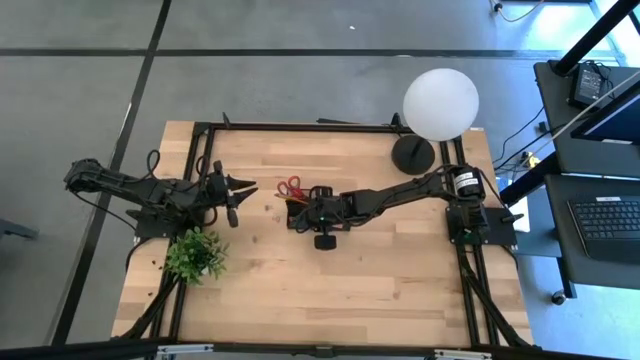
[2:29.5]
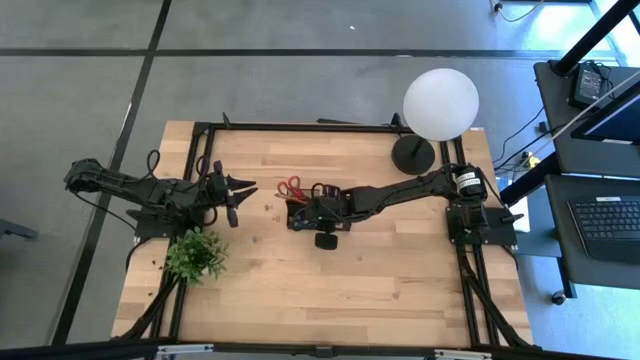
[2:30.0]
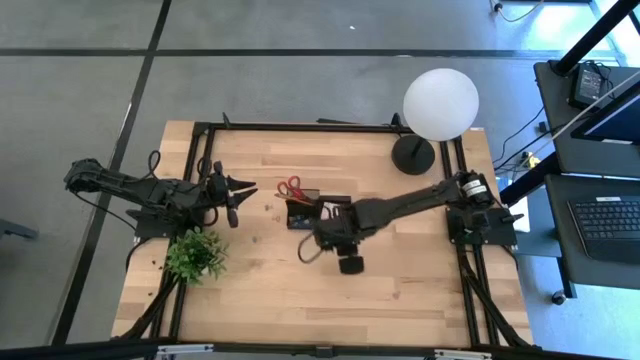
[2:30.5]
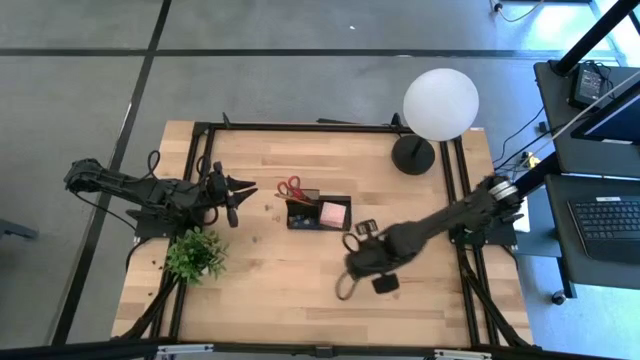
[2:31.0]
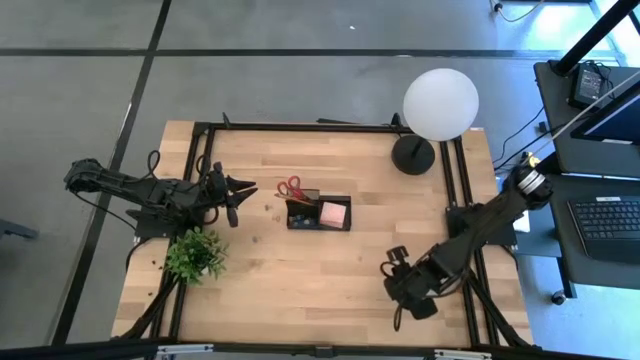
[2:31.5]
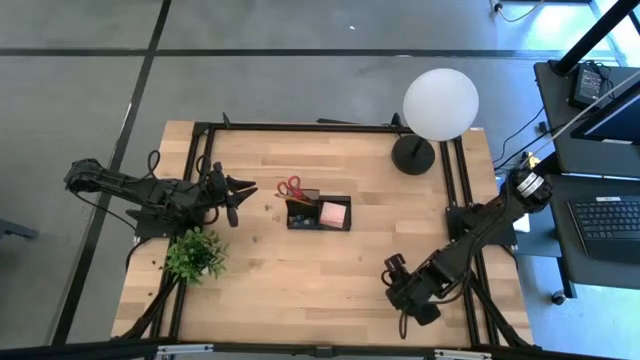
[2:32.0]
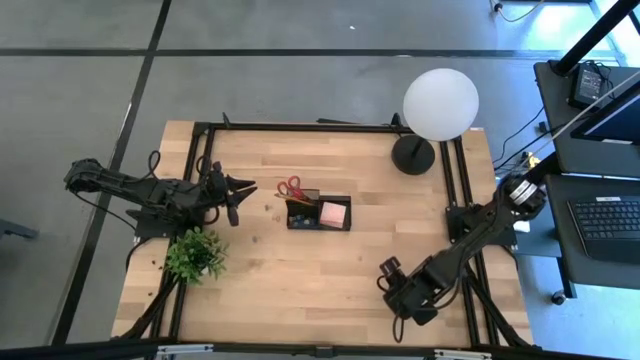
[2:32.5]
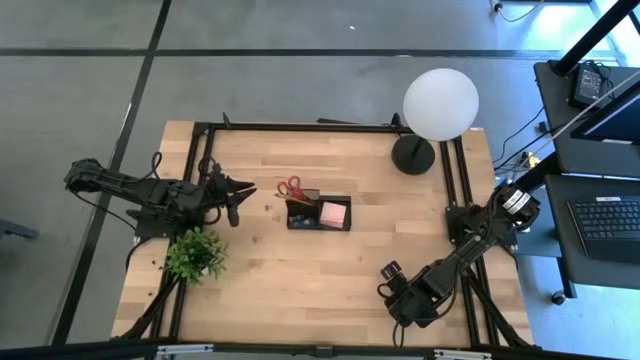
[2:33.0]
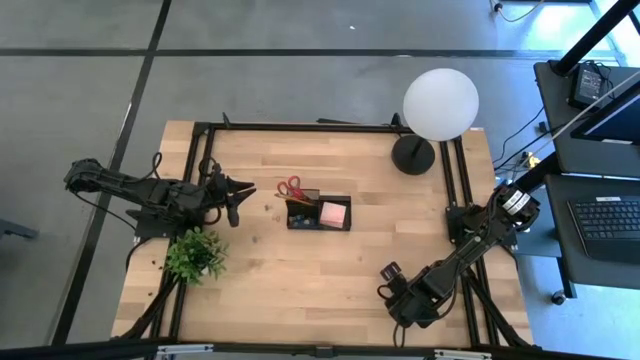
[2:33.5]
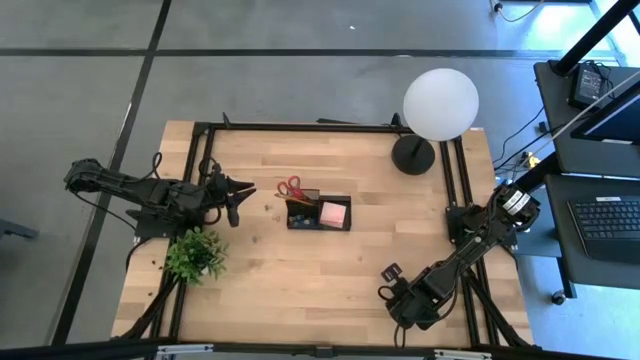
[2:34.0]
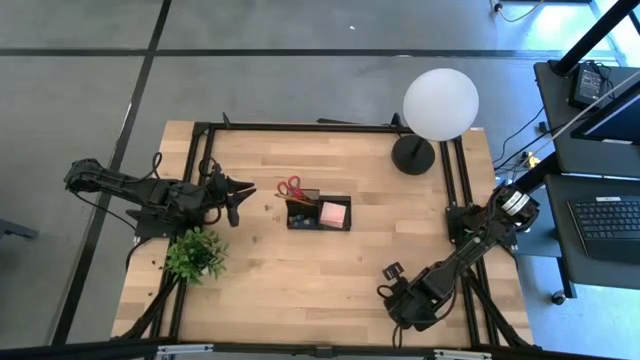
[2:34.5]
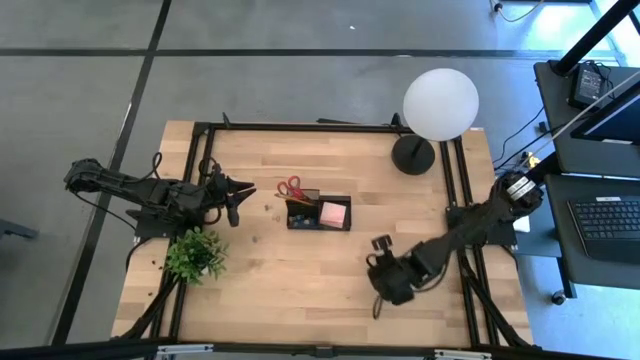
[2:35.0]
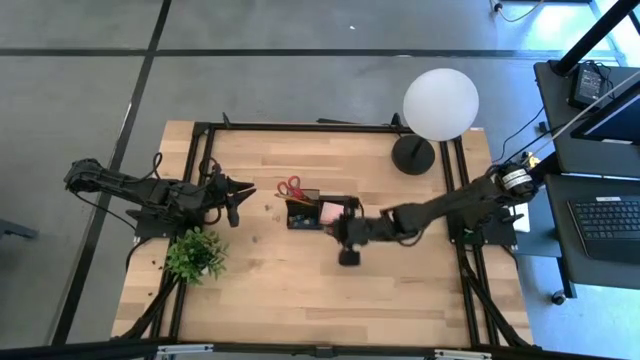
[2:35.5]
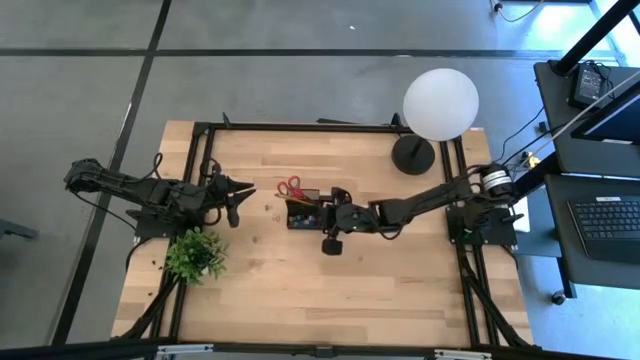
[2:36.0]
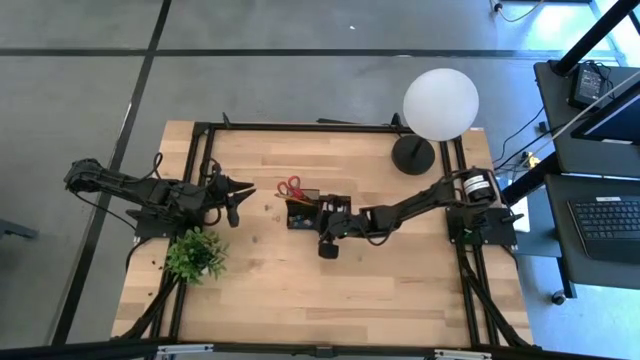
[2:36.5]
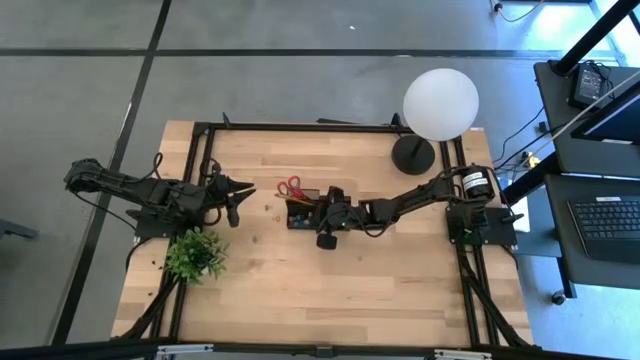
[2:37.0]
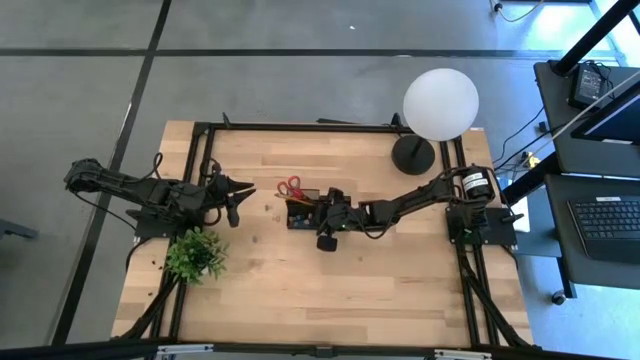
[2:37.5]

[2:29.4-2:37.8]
Task: Pick and place office supplies into organizer
Put the pink binder clip into the black desk organizer

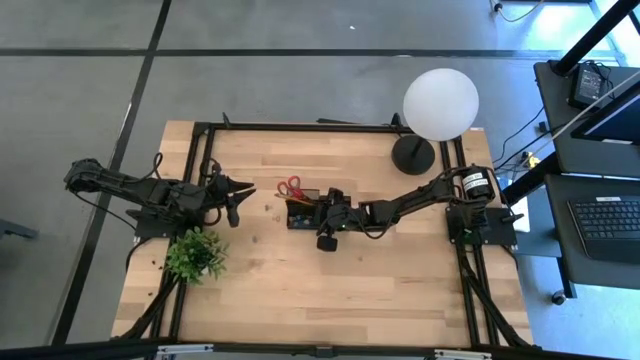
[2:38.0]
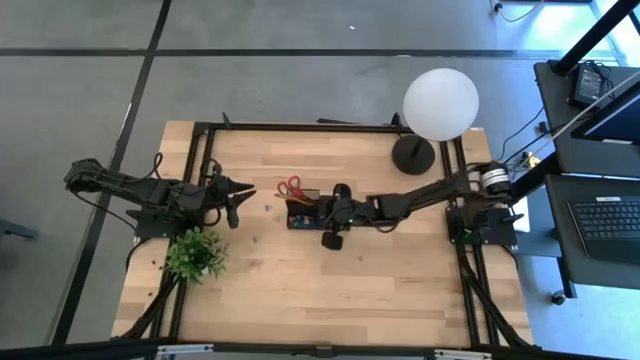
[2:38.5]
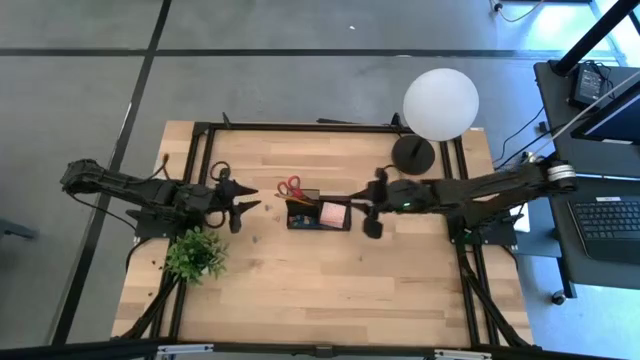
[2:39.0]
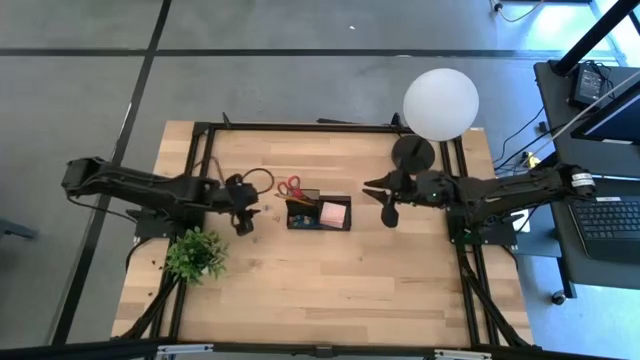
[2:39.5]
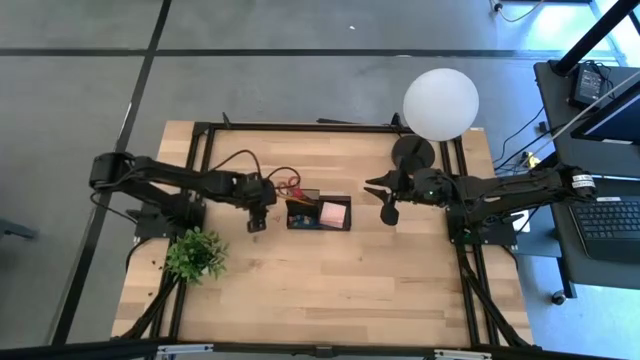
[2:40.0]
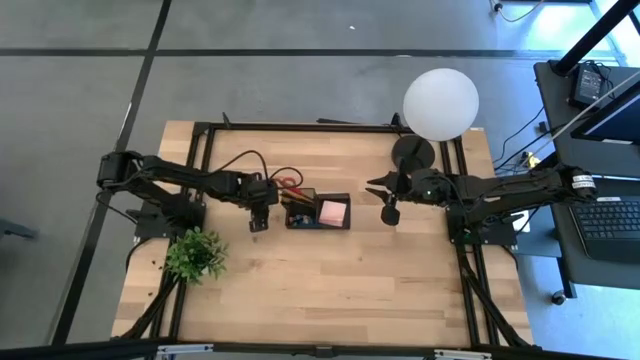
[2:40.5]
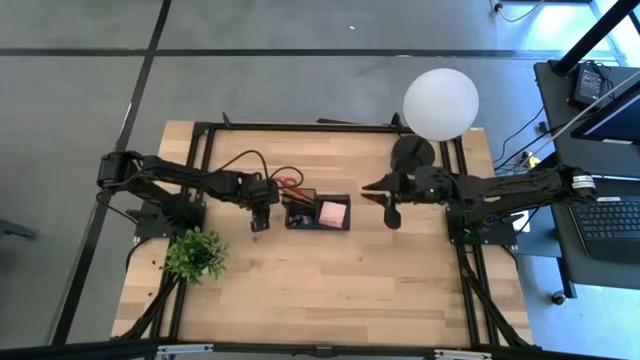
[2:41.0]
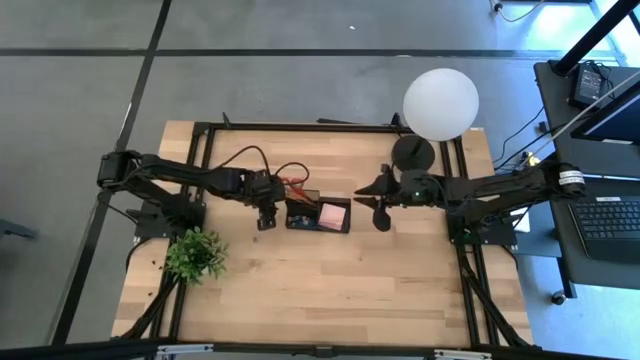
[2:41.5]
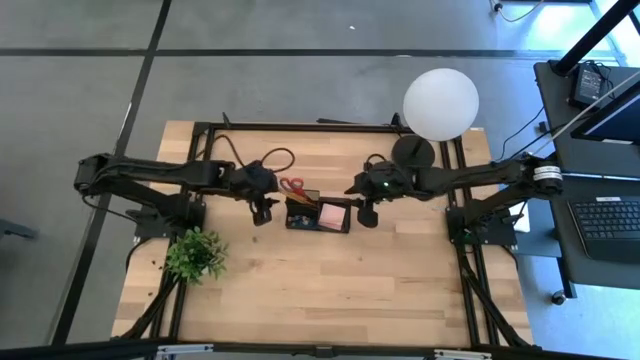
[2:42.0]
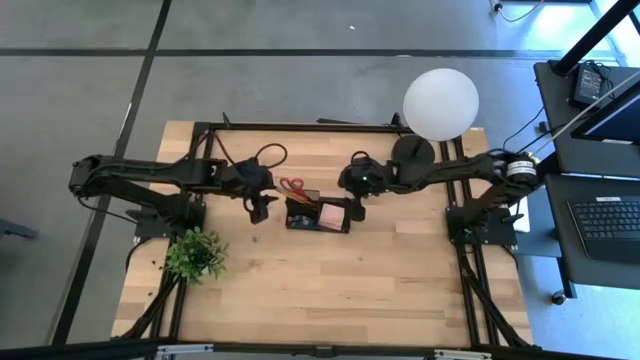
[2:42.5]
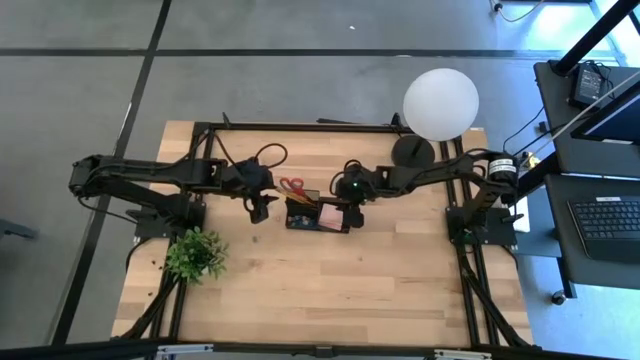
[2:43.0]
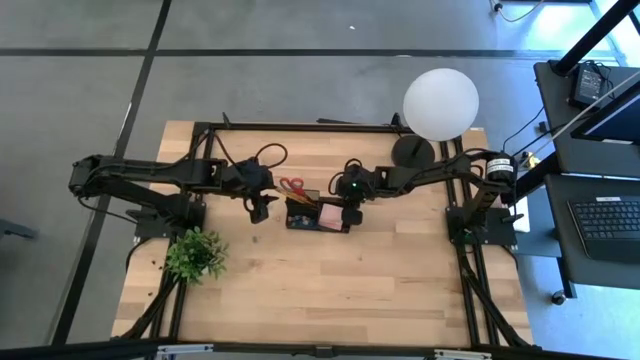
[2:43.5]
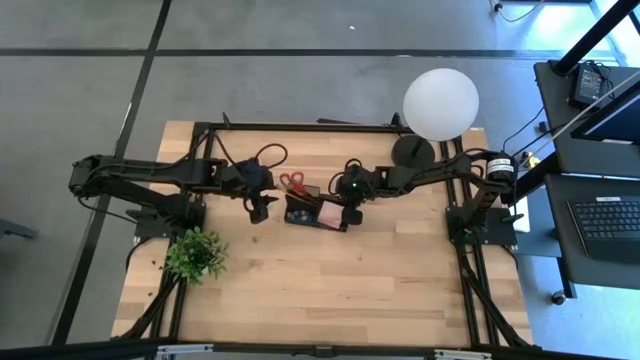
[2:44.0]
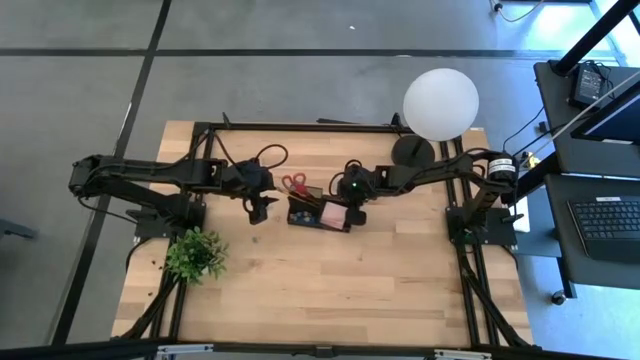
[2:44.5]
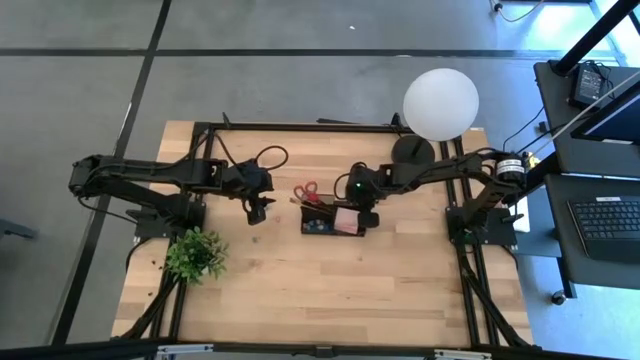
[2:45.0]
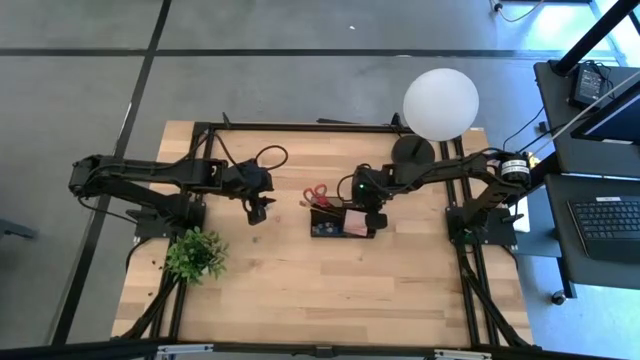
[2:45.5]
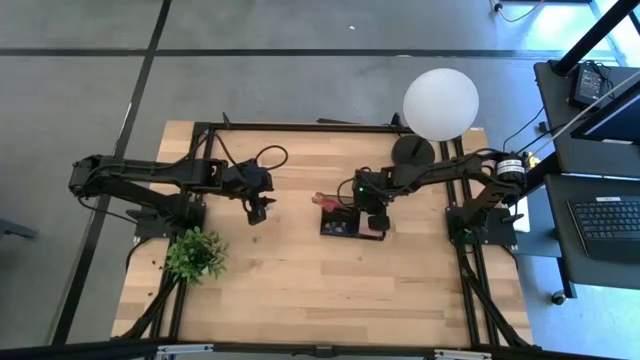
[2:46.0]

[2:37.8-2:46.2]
Adjust the black desk organizer

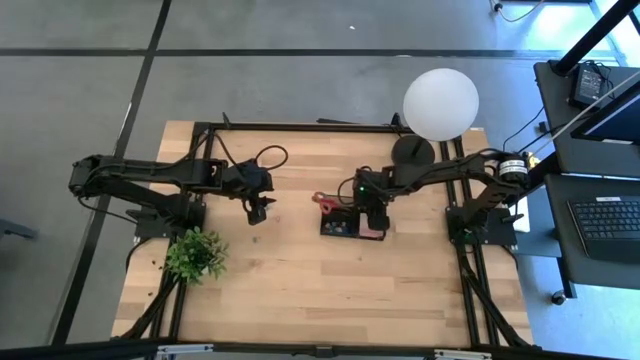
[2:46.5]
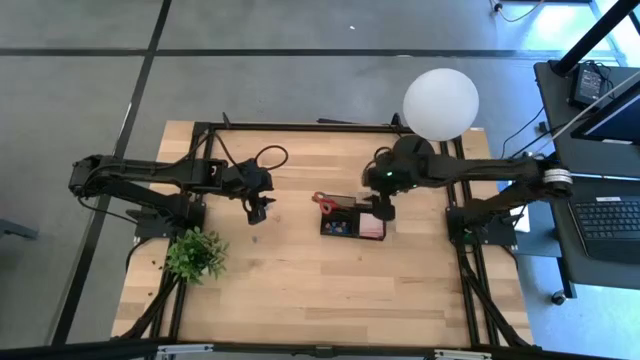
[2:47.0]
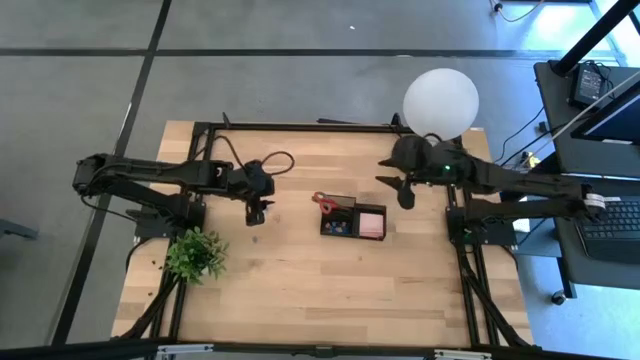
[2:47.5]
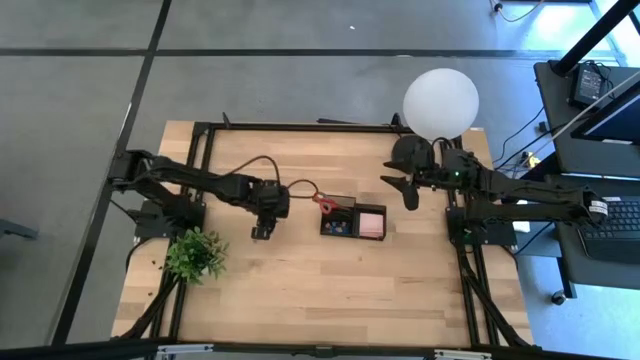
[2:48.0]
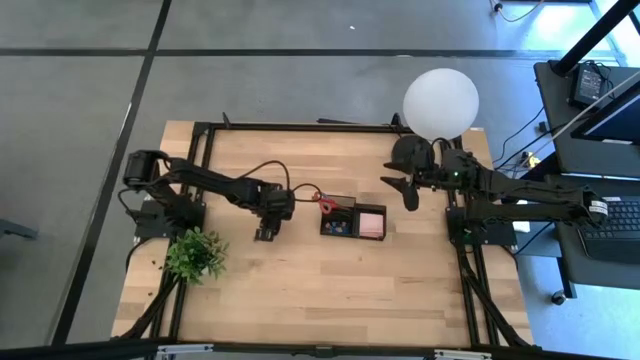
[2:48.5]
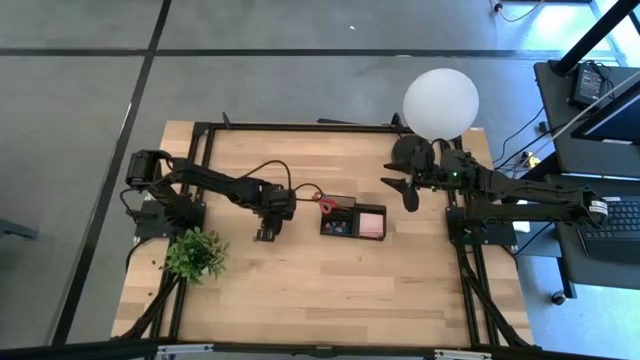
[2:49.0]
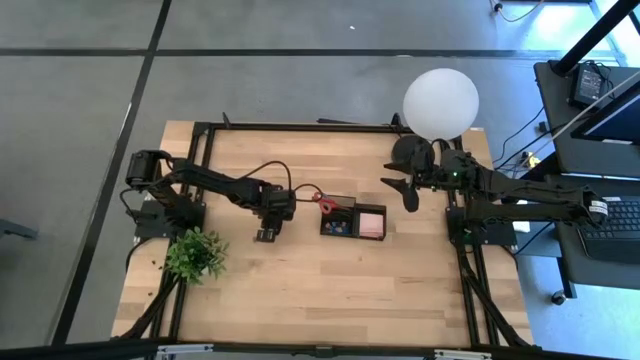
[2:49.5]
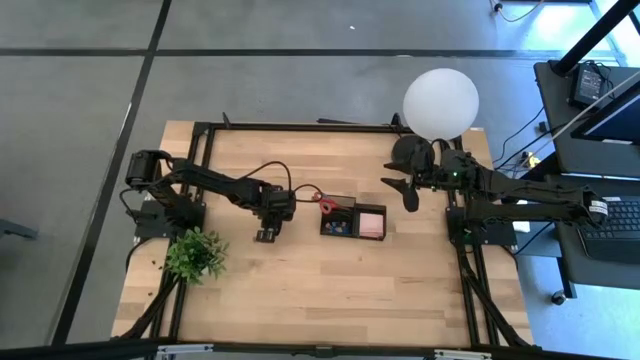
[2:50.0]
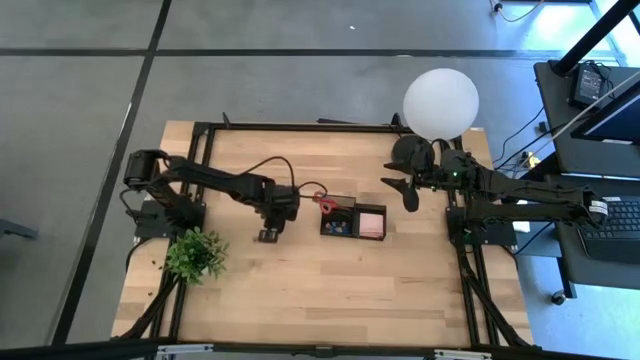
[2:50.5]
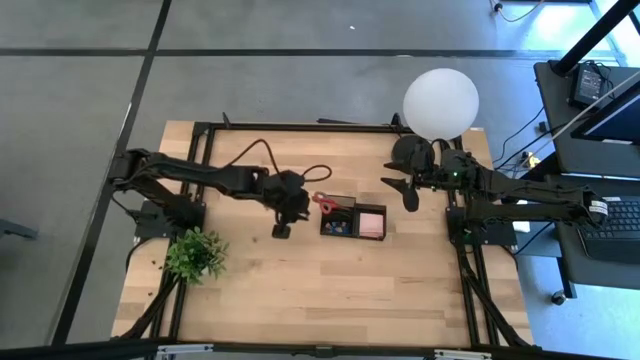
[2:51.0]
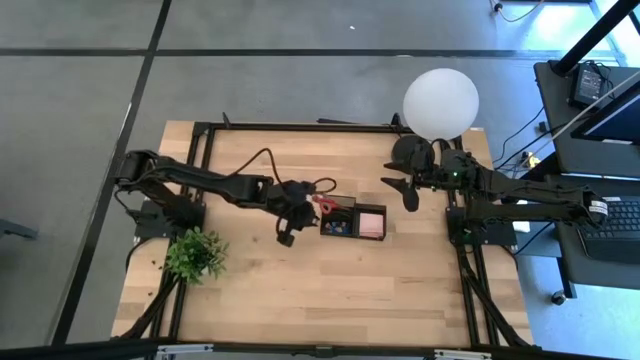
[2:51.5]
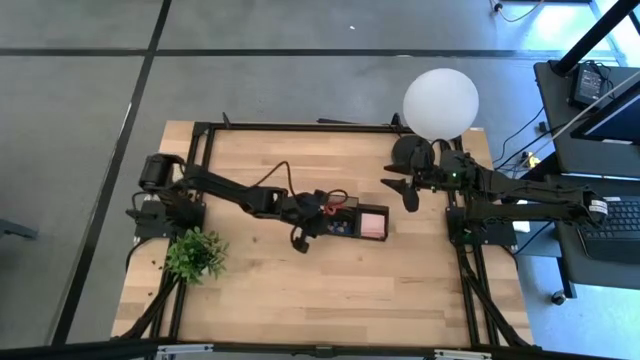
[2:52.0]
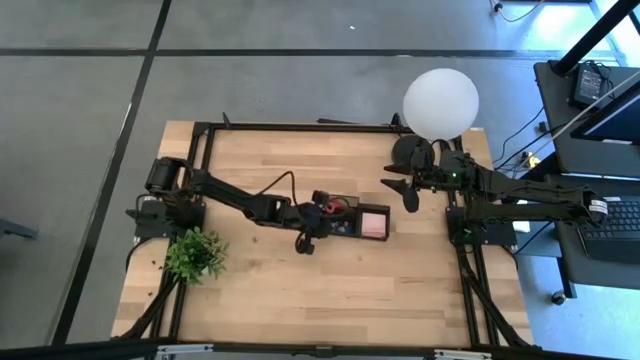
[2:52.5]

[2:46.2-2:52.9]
Put the pink binder clip into the black desk organizer
